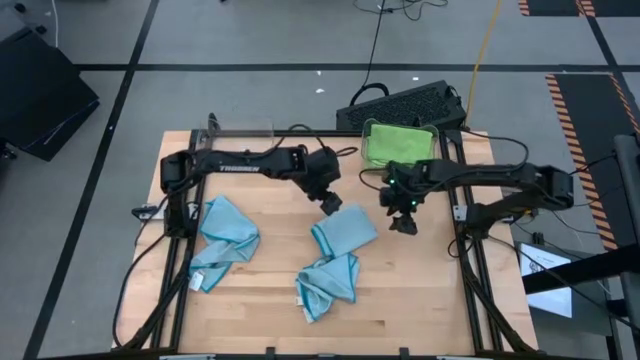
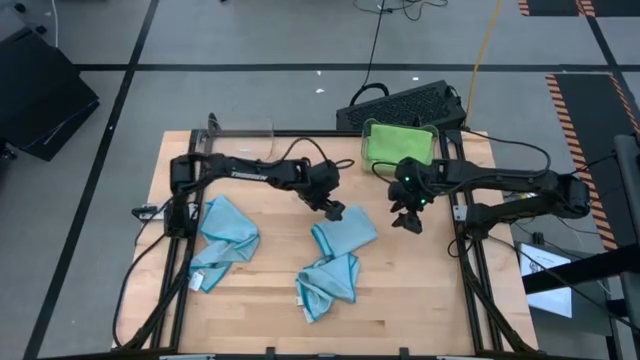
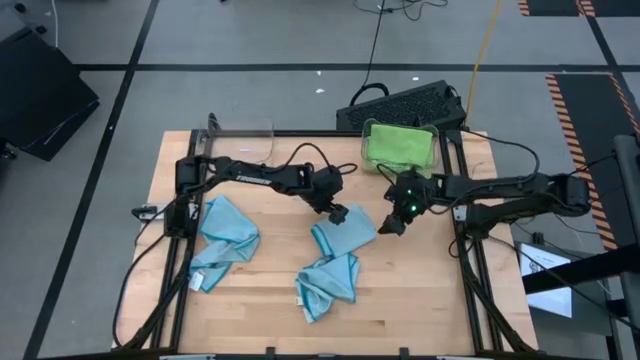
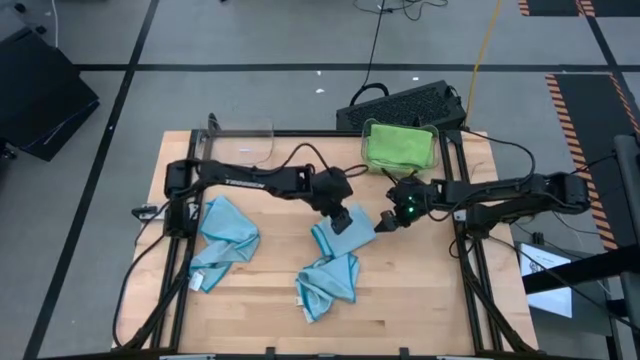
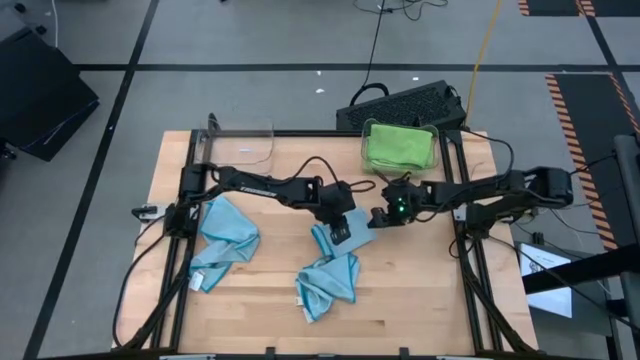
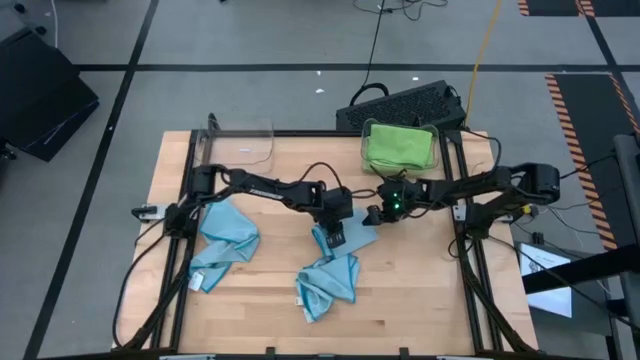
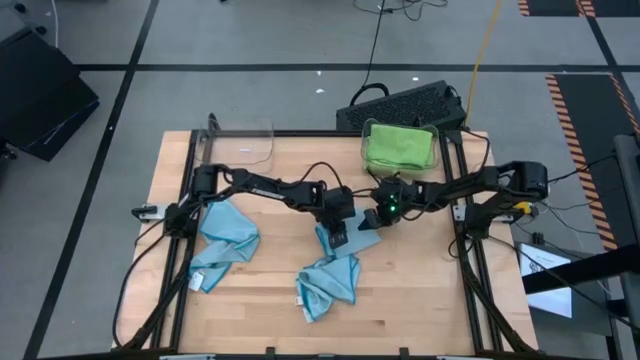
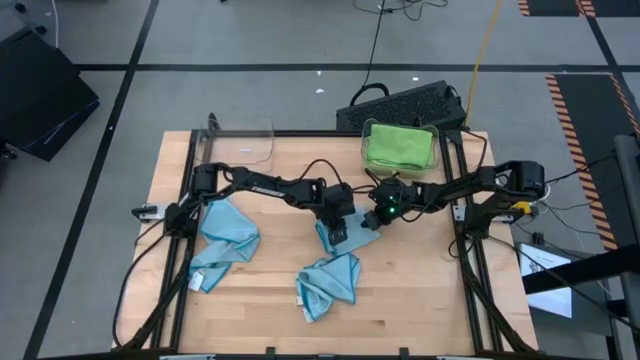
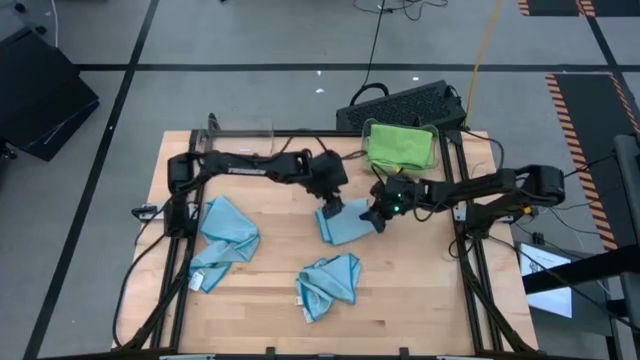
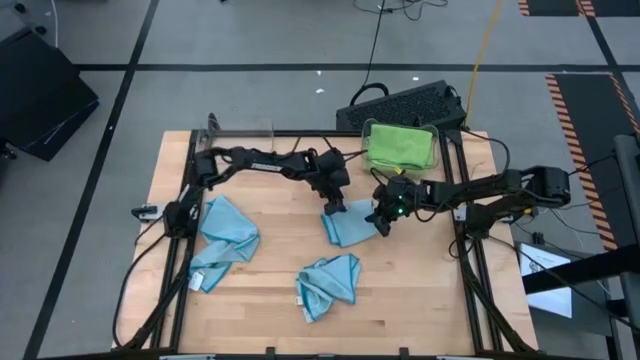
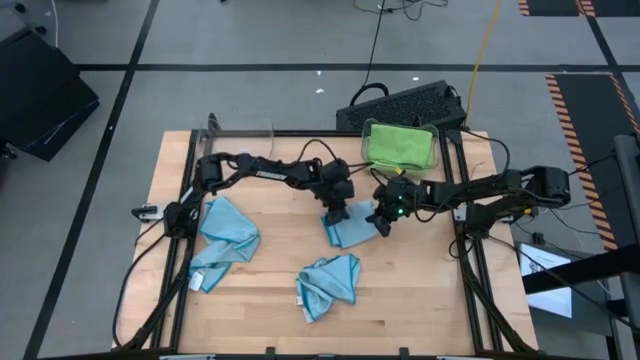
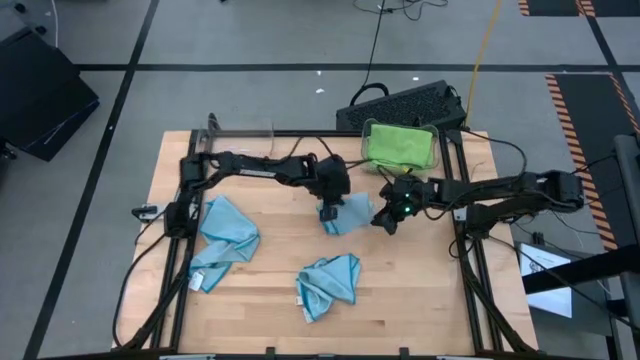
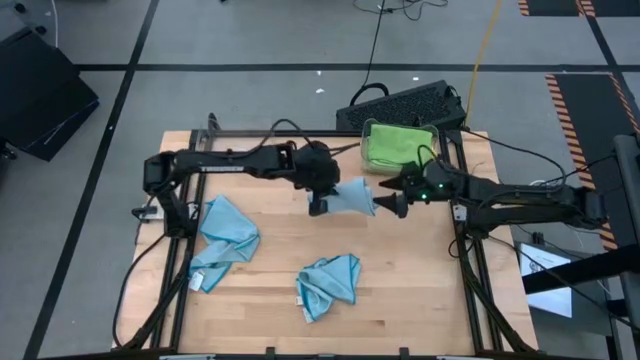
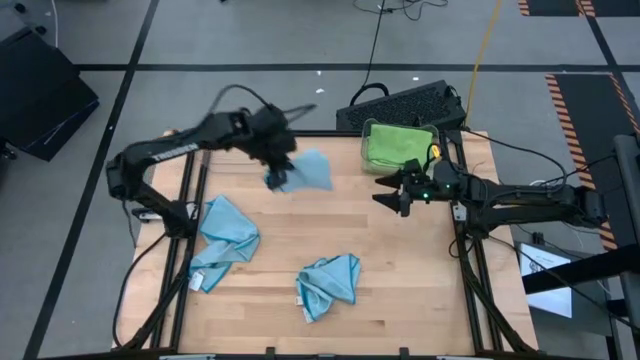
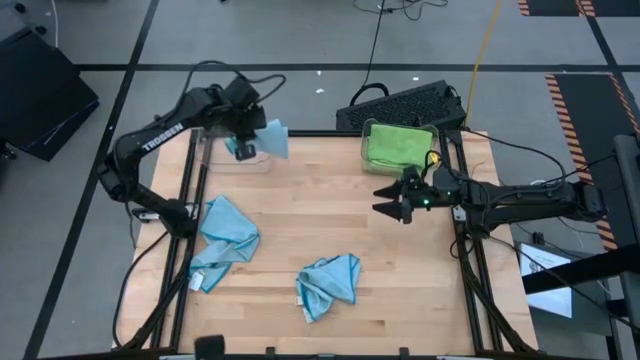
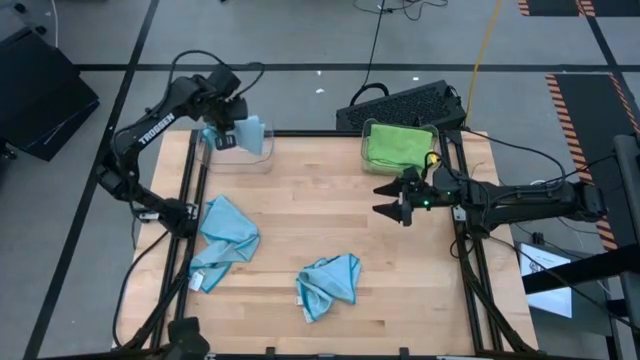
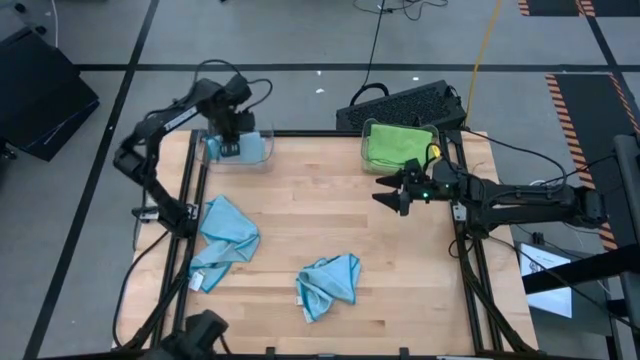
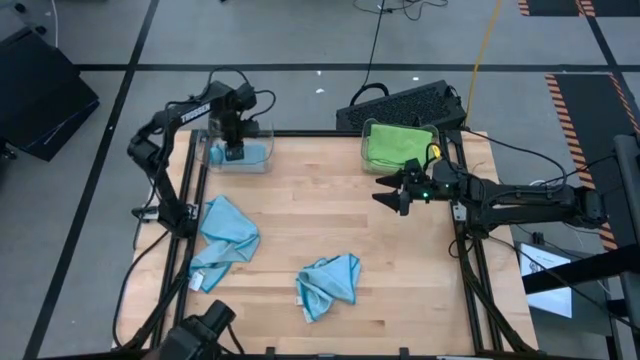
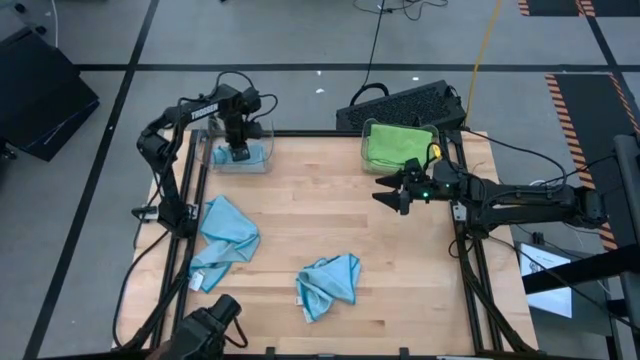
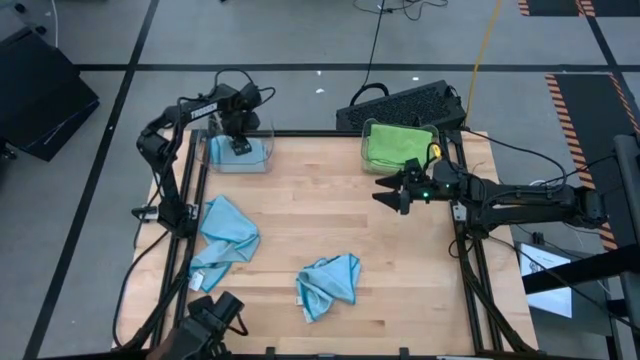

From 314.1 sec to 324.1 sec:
Task: Sort microfiber towel by color & place in baskets
Put the top blue towel into the left transparent bin

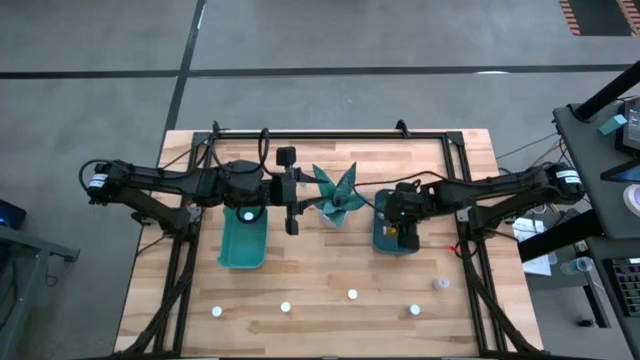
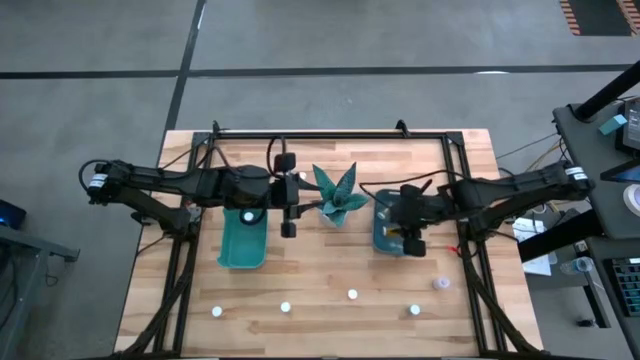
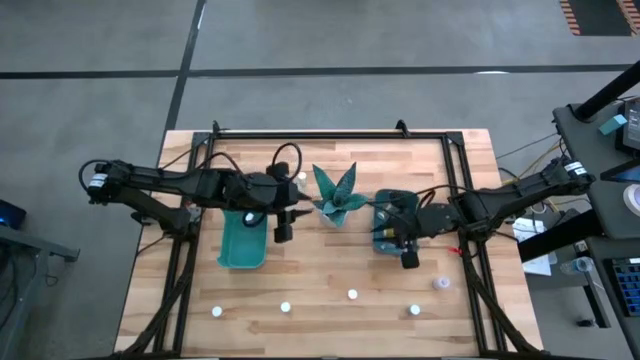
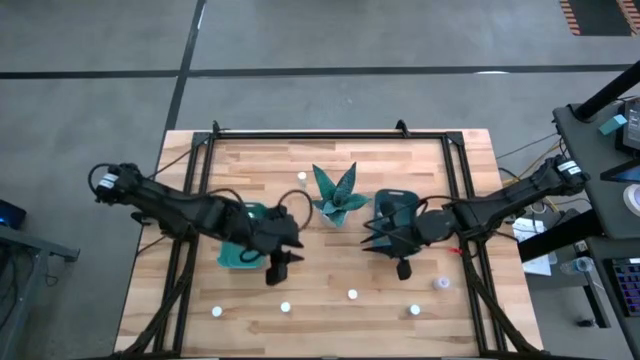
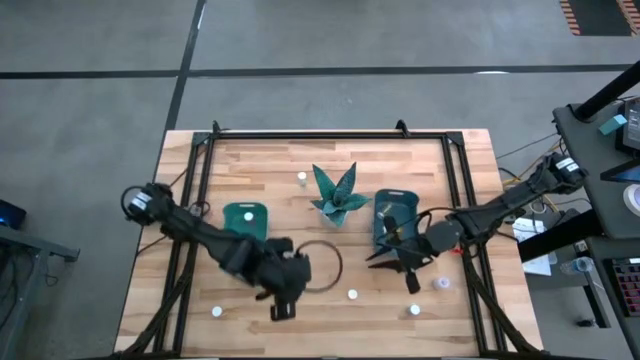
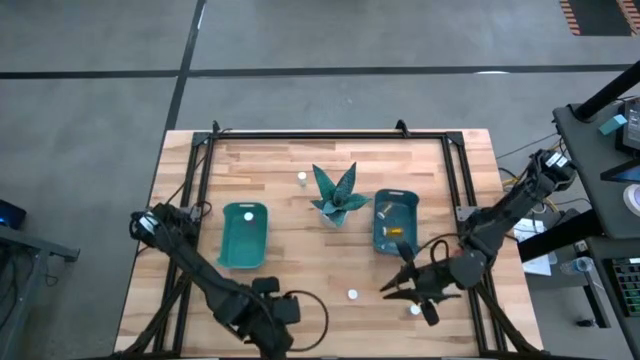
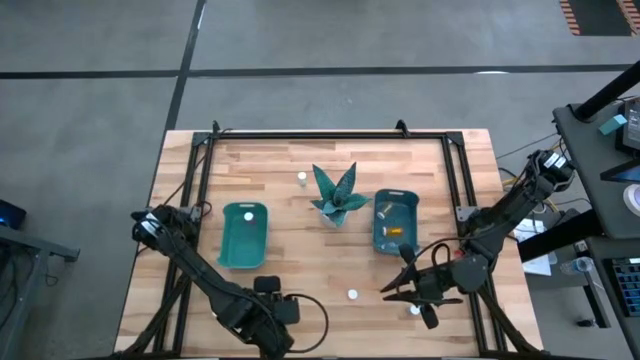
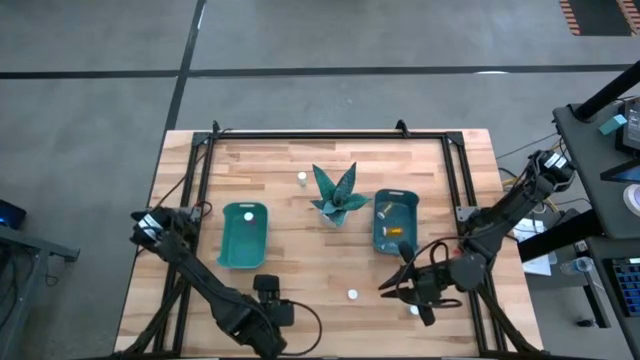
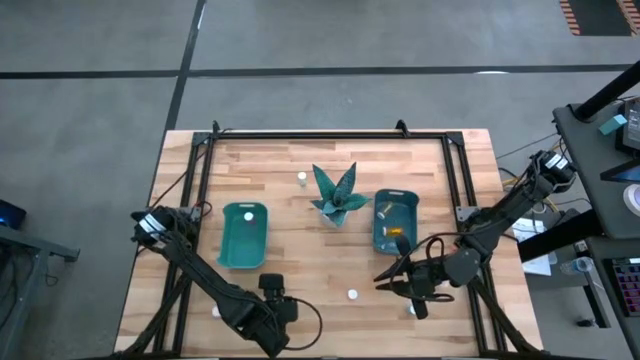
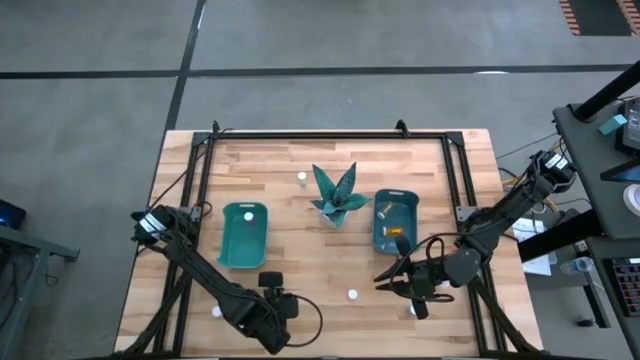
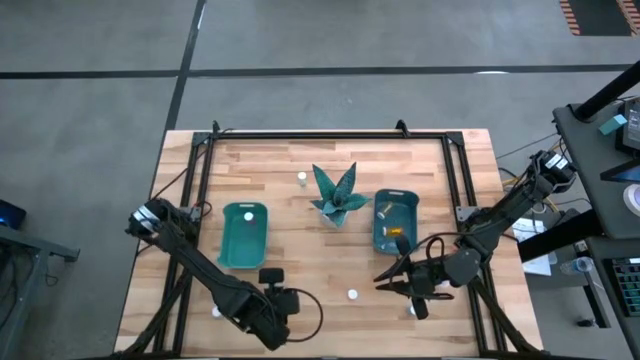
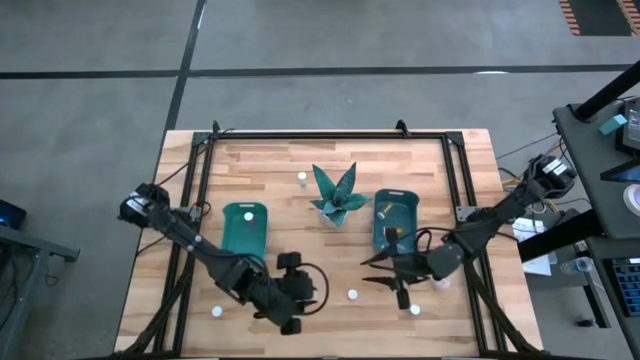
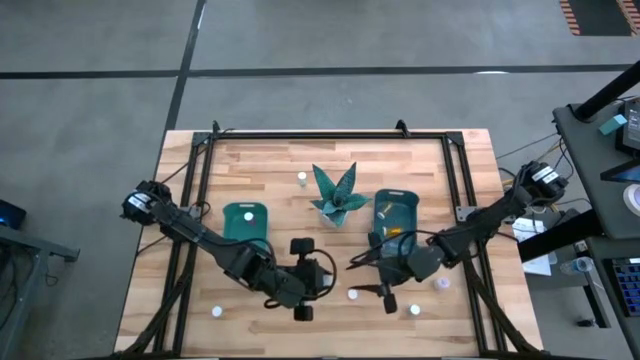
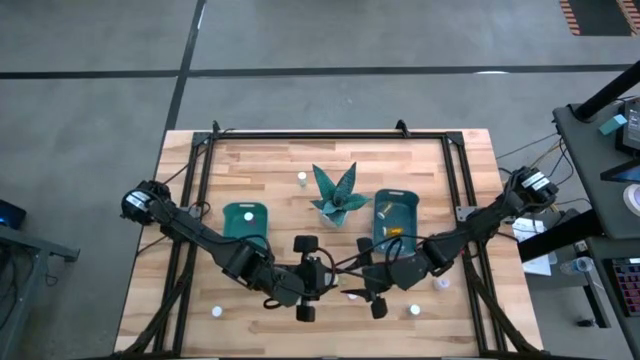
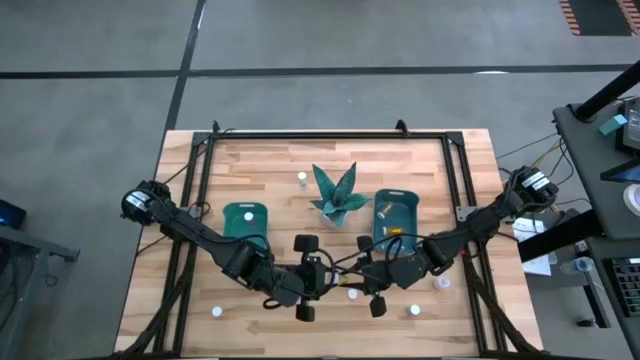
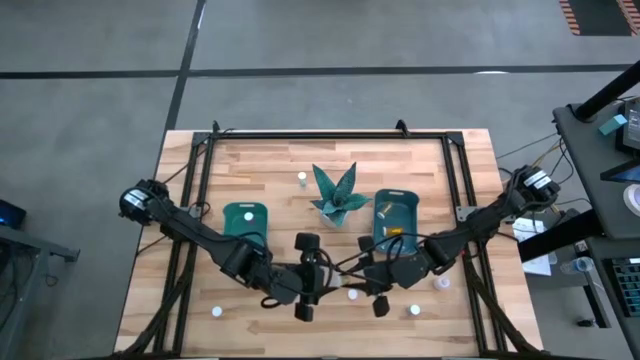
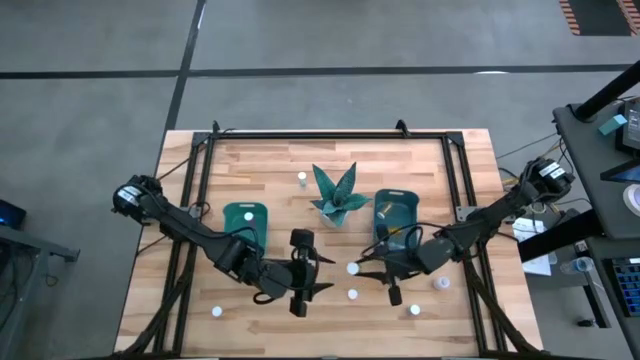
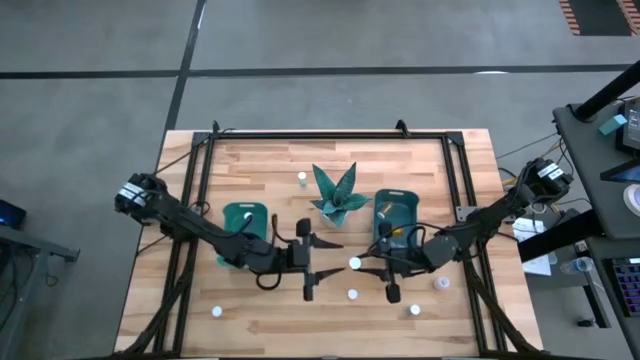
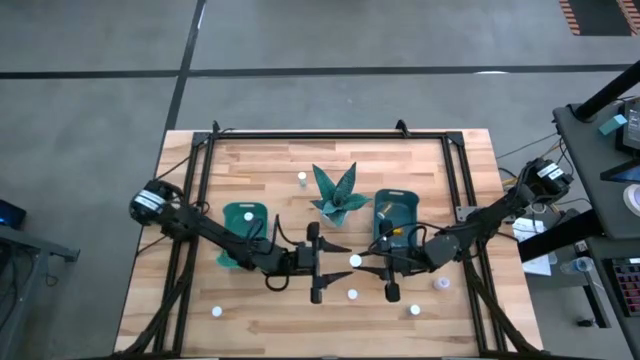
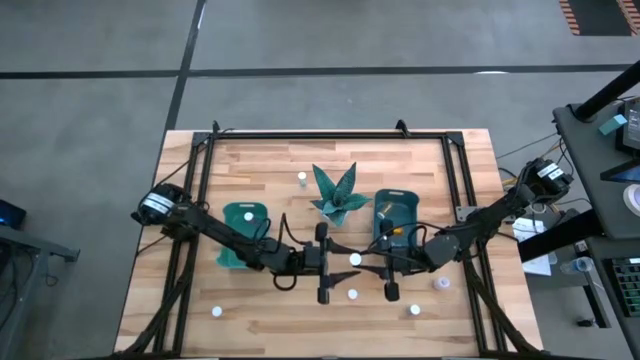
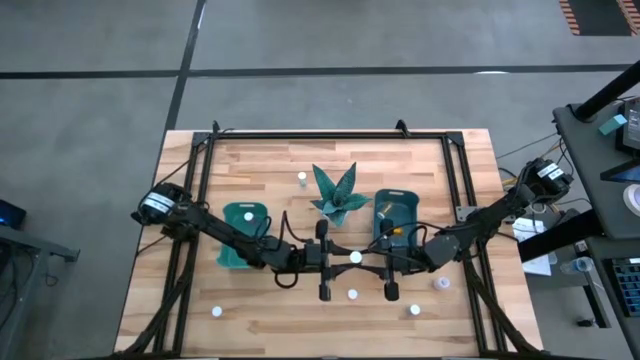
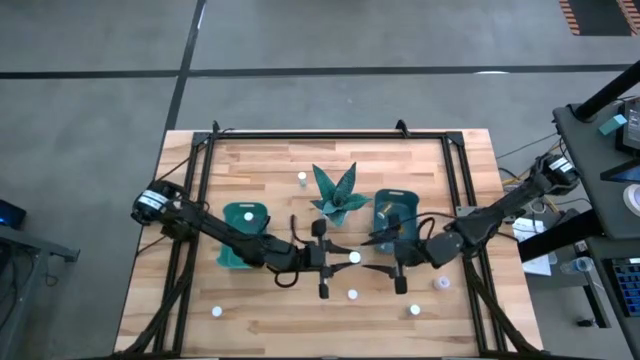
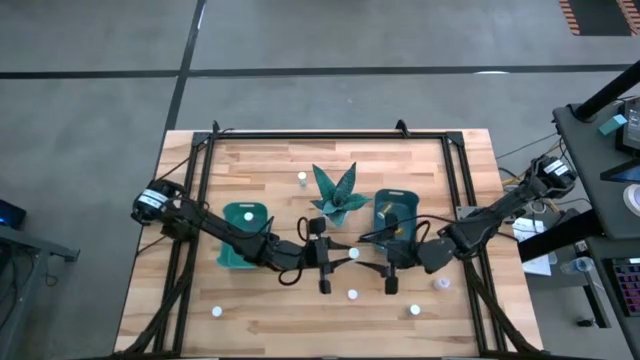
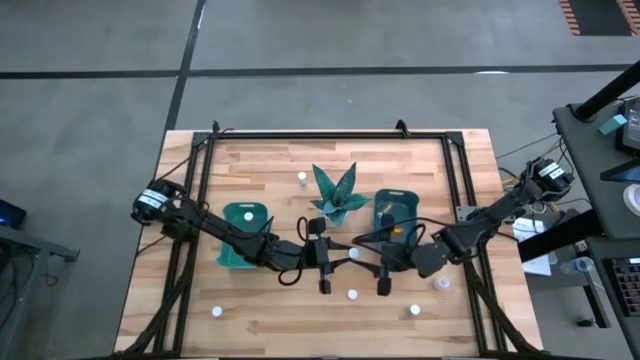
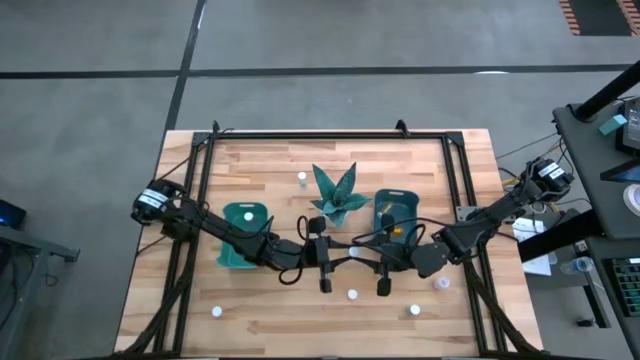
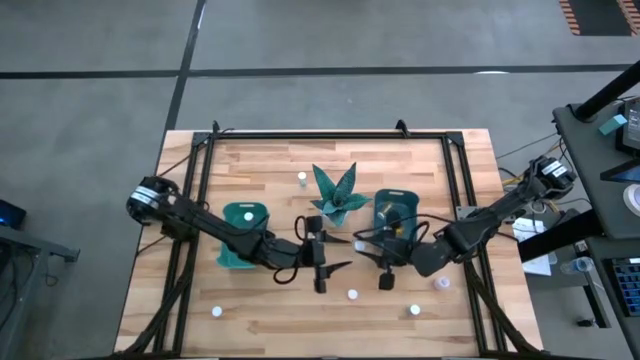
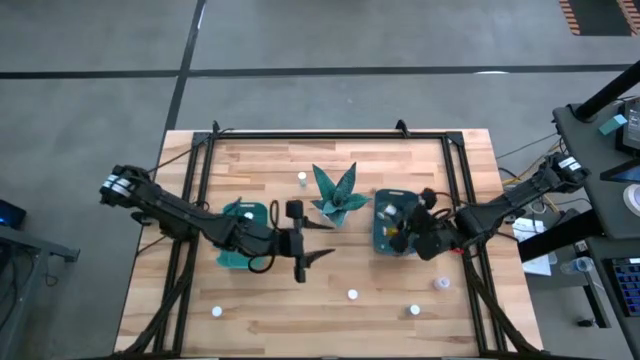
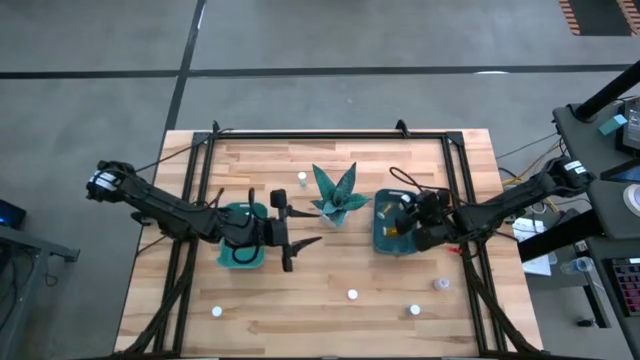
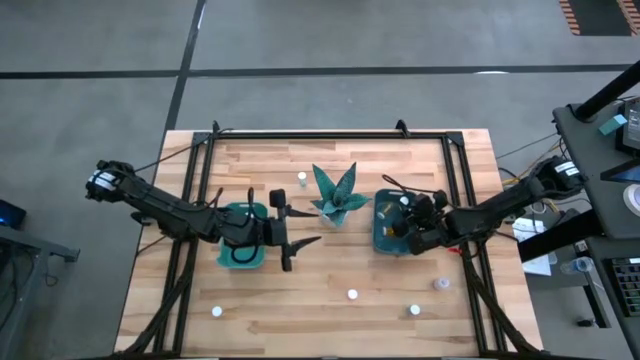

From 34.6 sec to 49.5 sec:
Task: Pick and place medicine bottles into bin by pill shape (circle, oval)
Put the yellow tablet bottle into the blue bin
